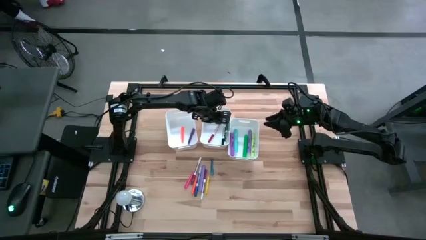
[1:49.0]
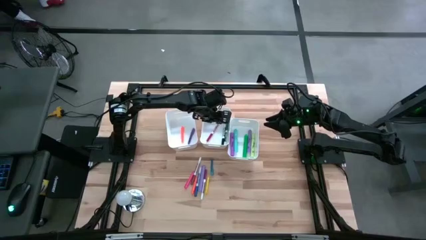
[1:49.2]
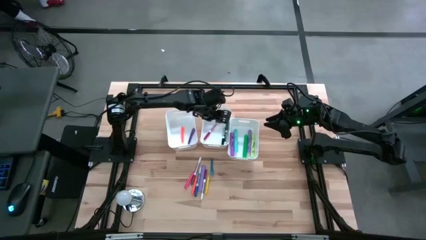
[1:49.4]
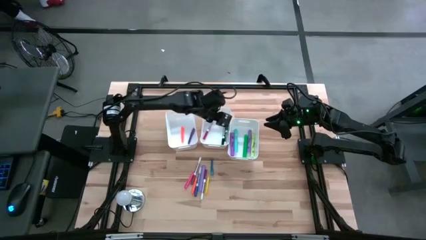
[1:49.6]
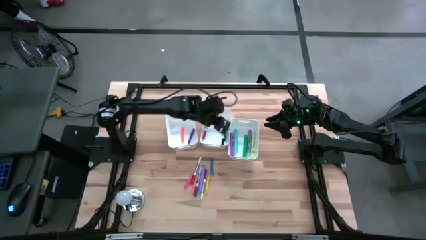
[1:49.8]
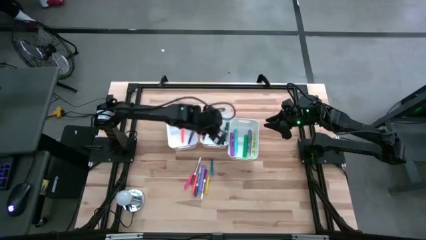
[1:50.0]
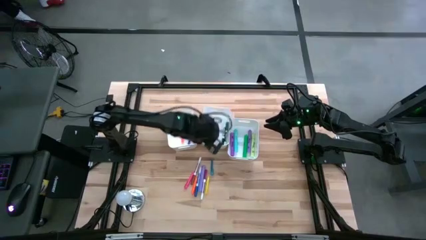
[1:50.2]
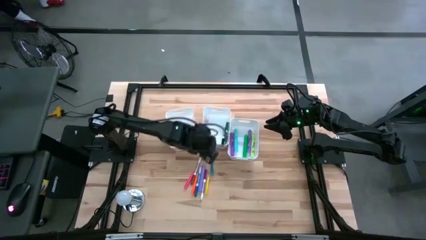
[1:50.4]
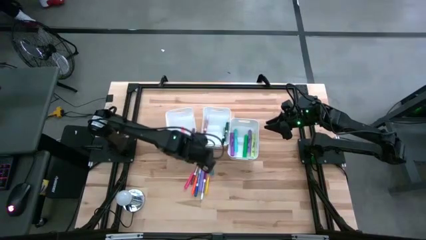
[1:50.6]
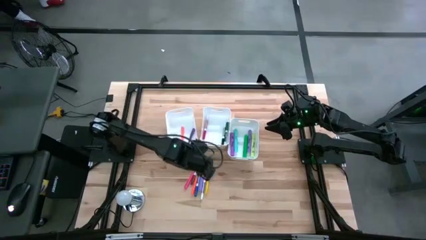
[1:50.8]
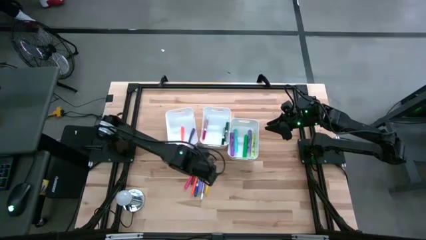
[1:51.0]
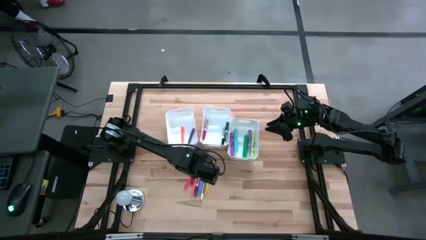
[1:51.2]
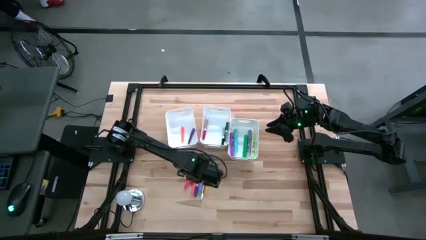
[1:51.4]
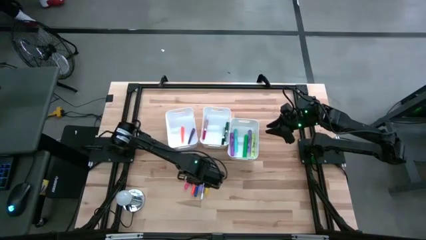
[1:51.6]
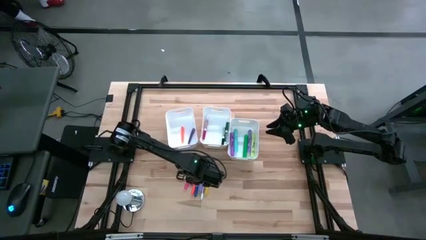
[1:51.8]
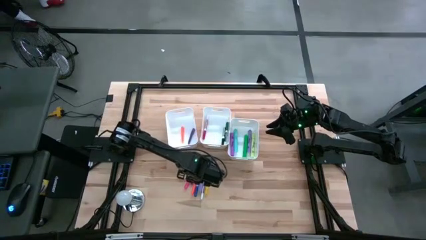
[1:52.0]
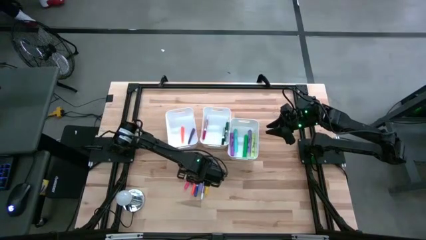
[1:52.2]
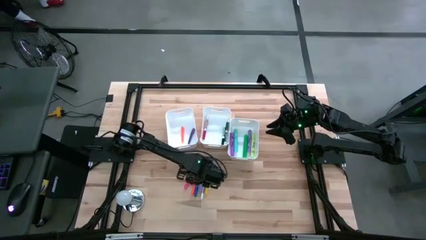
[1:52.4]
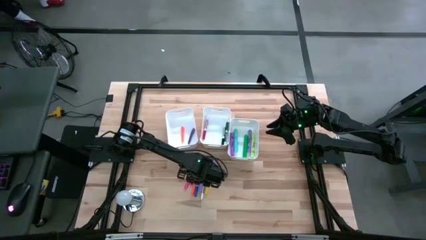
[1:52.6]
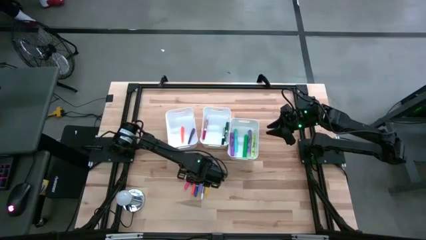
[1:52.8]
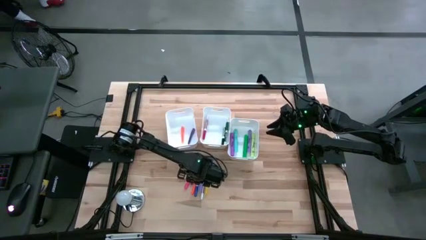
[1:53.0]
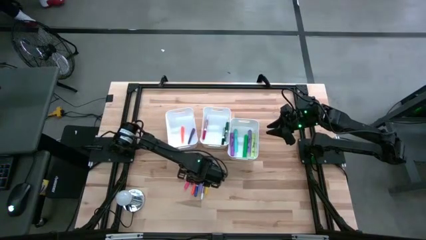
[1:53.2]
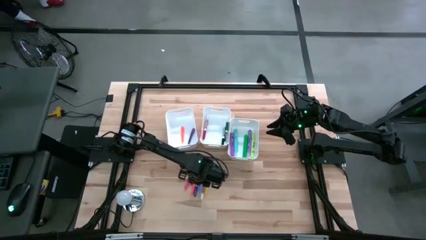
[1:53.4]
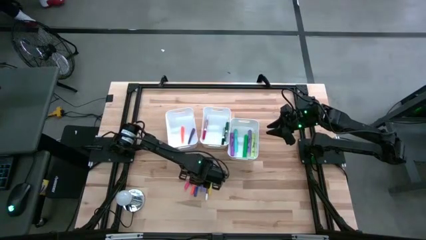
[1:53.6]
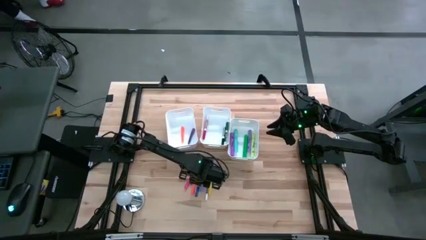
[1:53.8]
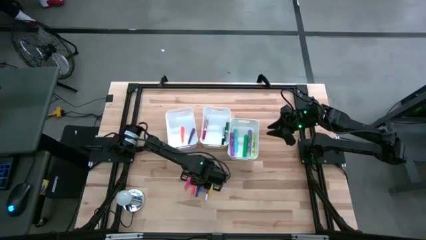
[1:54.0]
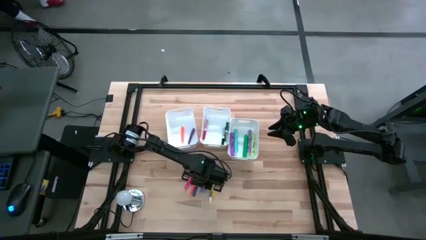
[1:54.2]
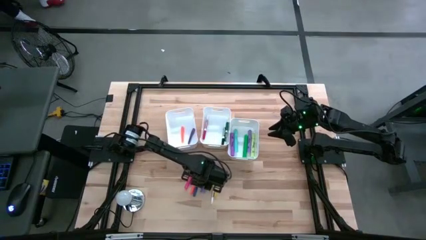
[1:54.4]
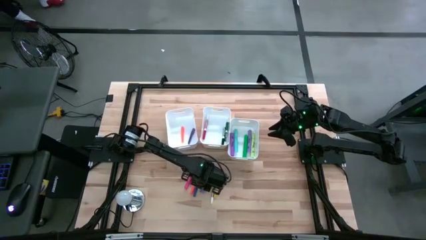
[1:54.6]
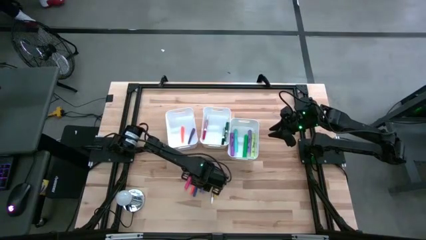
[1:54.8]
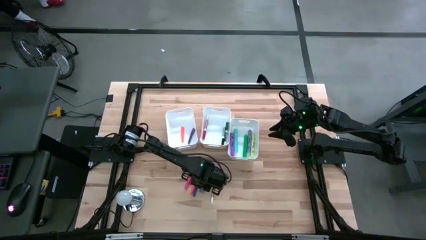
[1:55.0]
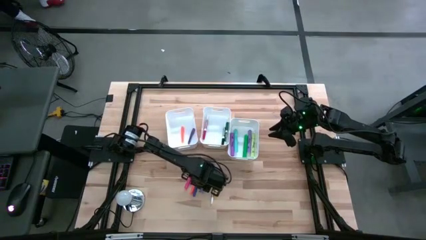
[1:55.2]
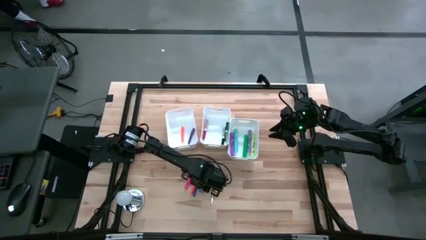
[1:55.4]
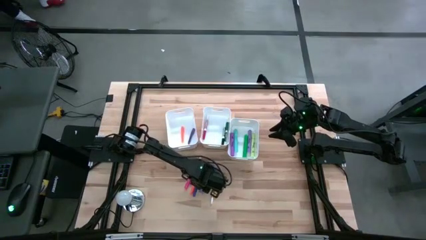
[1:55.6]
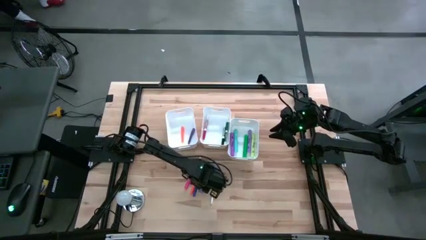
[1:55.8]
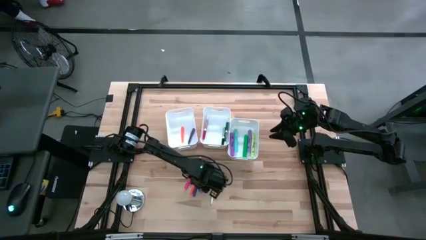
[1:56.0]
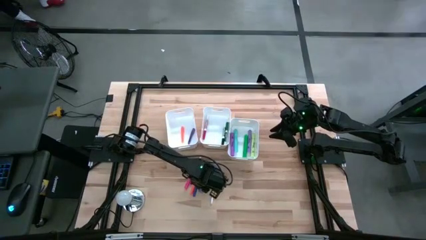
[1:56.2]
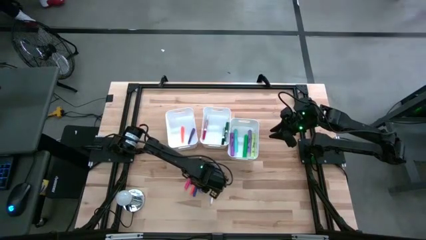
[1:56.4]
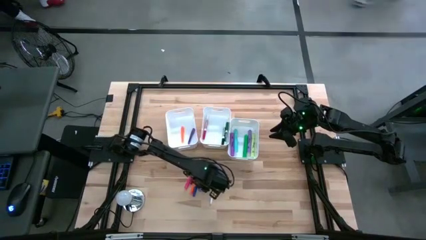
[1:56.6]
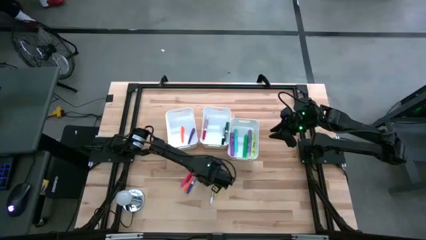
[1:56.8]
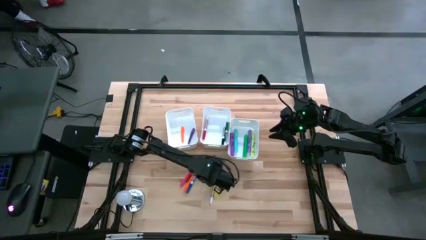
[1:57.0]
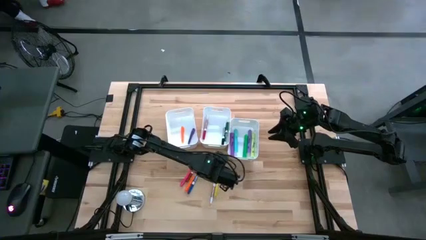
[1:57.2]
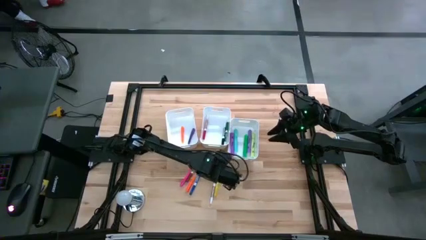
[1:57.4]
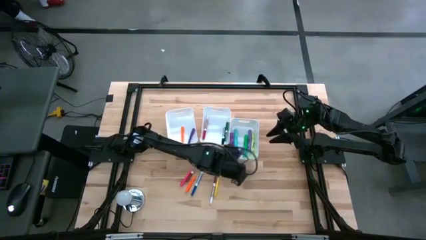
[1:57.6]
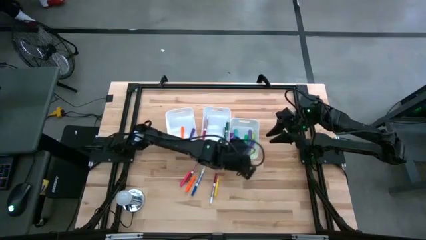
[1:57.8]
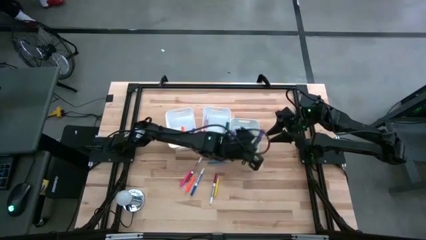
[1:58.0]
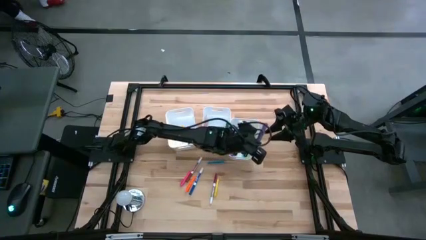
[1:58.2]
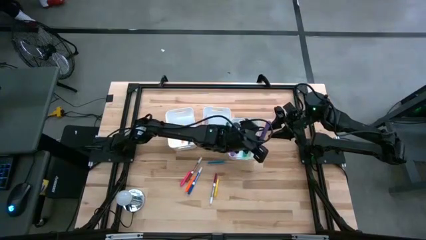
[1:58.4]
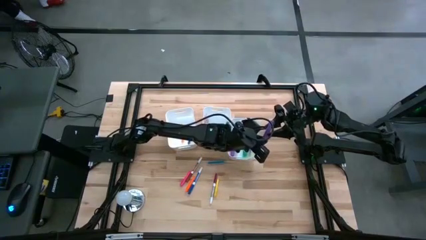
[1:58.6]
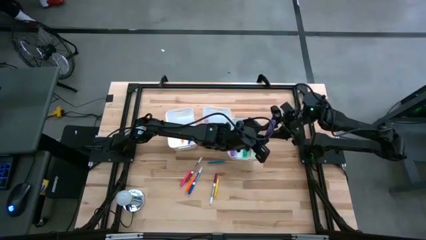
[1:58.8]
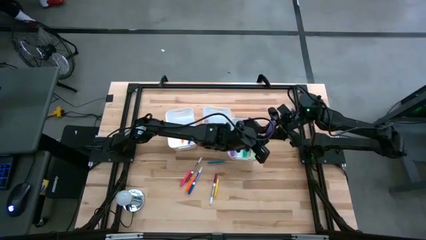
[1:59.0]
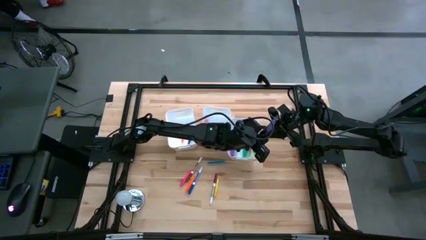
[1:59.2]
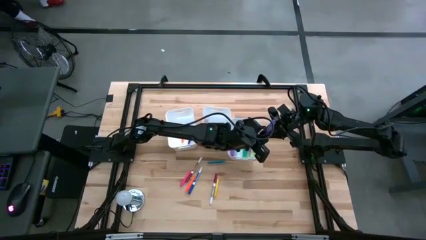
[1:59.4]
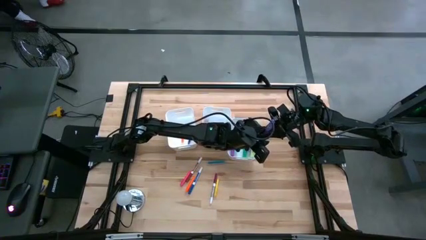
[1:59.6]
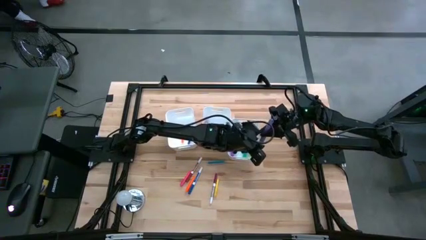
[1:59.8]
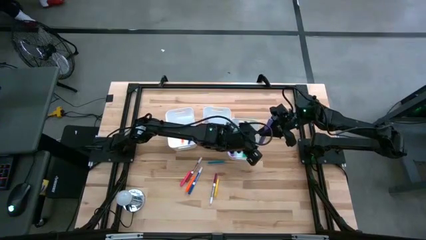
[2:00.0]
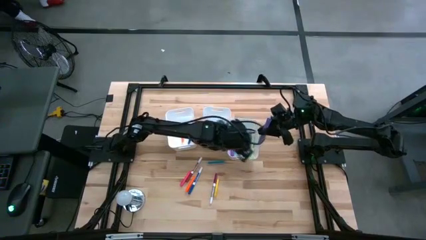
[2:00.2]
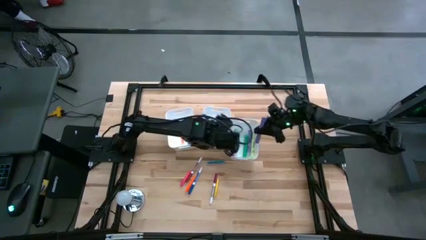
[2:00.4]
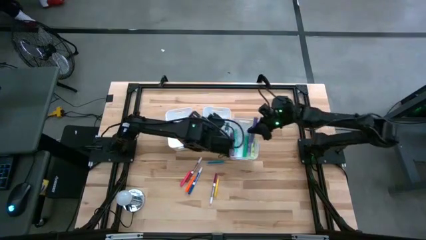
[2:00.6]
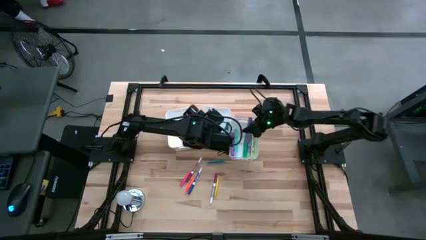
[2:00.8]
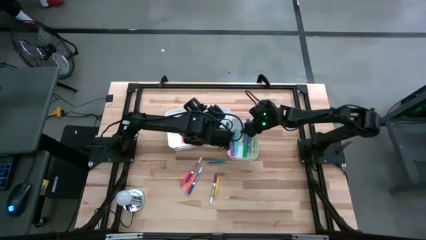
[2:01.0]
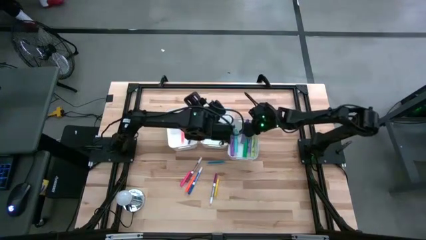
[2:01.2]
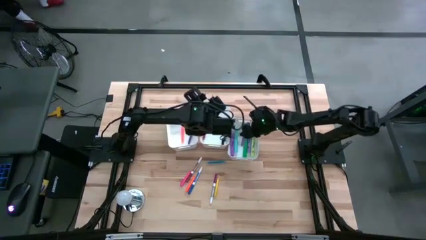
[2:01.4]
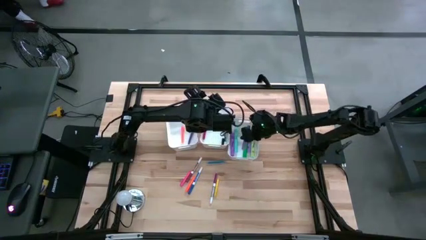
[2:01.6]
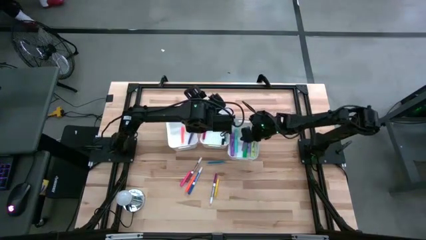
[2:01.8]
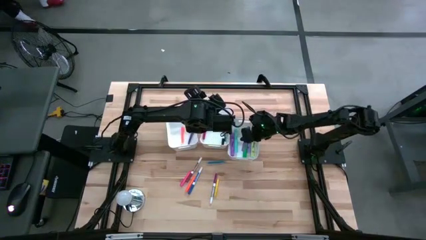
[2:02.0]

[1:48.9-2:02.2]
Task: Pick & Place Markers
Put the violet highlighter into the right white bin

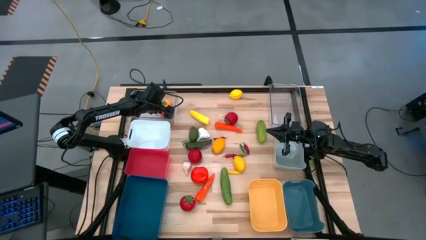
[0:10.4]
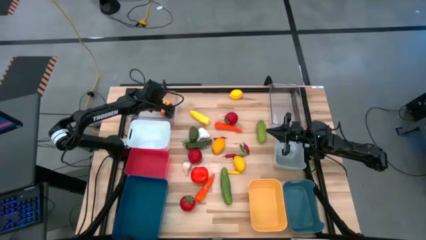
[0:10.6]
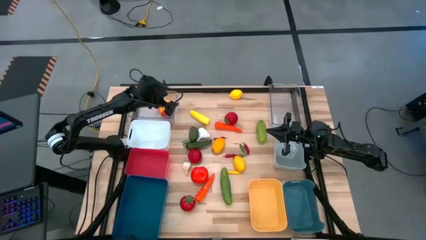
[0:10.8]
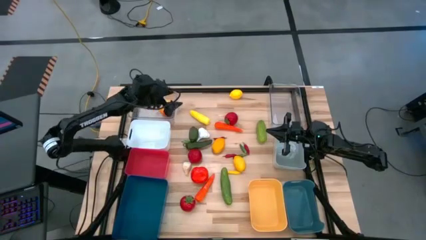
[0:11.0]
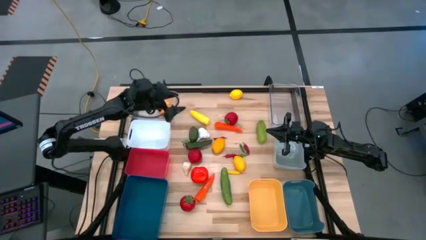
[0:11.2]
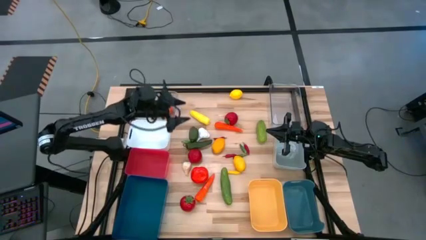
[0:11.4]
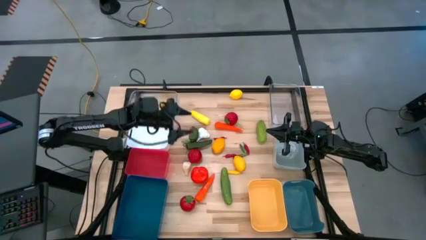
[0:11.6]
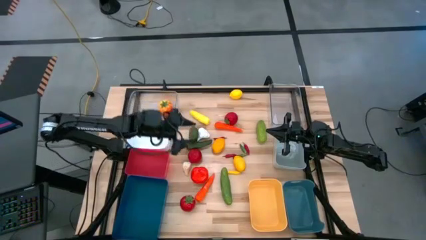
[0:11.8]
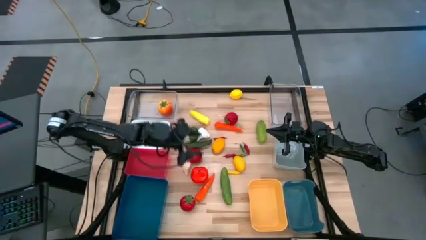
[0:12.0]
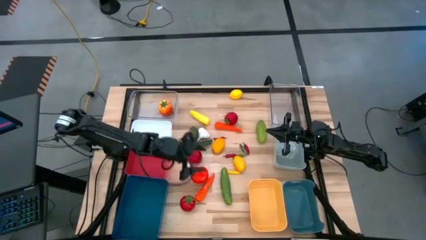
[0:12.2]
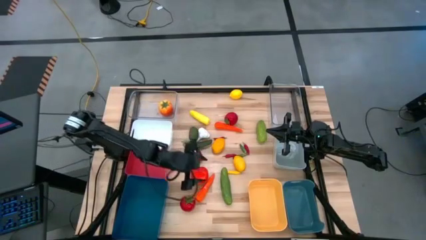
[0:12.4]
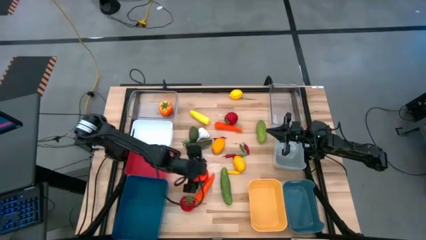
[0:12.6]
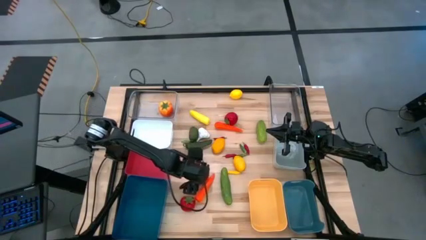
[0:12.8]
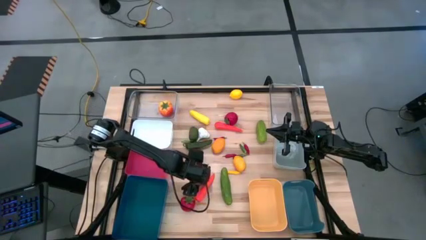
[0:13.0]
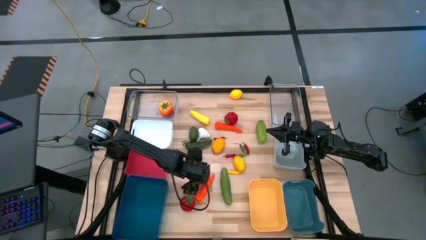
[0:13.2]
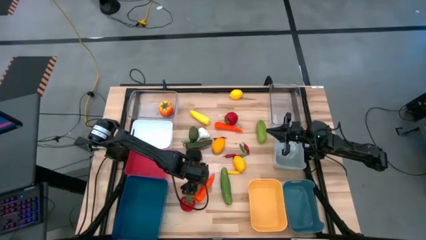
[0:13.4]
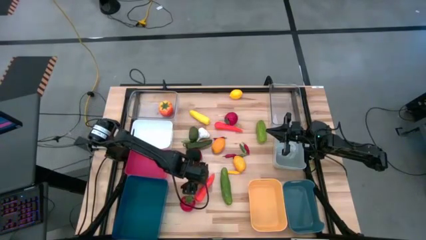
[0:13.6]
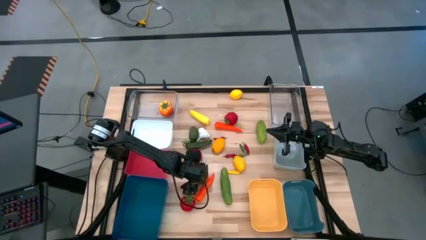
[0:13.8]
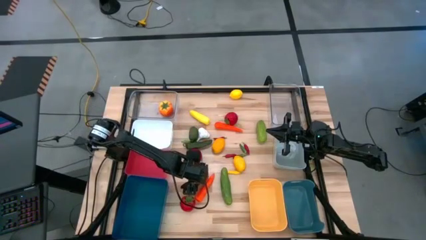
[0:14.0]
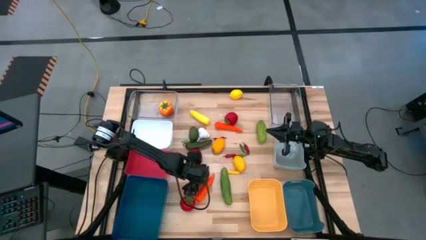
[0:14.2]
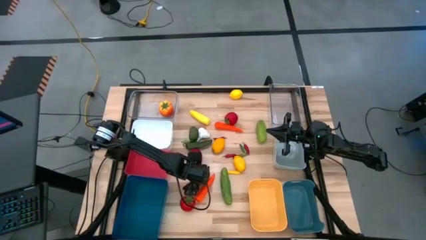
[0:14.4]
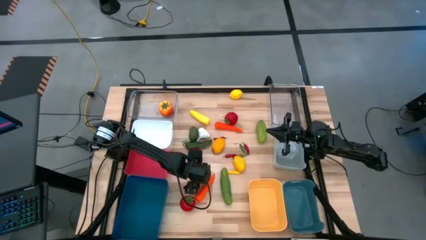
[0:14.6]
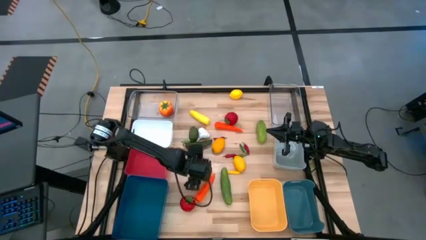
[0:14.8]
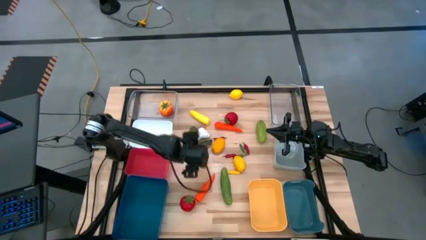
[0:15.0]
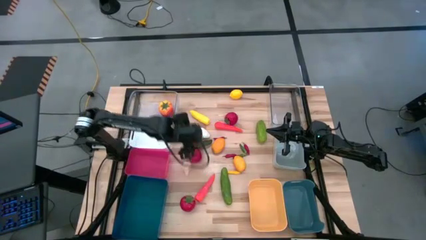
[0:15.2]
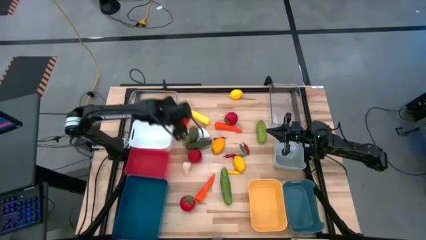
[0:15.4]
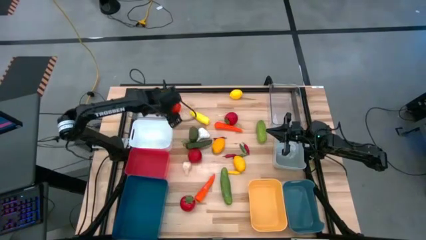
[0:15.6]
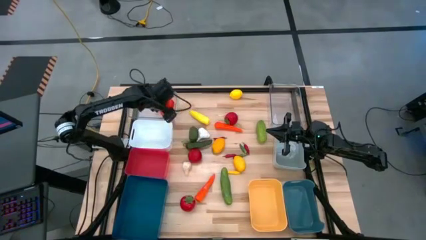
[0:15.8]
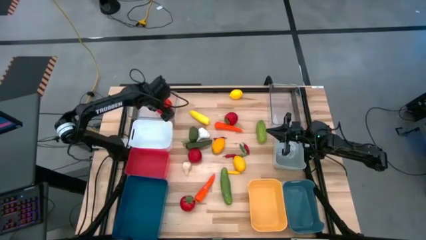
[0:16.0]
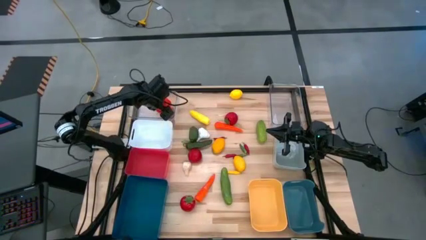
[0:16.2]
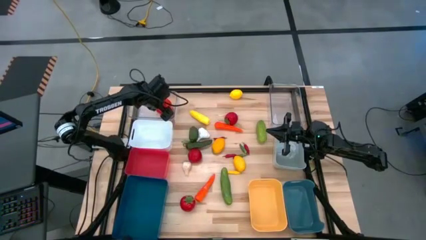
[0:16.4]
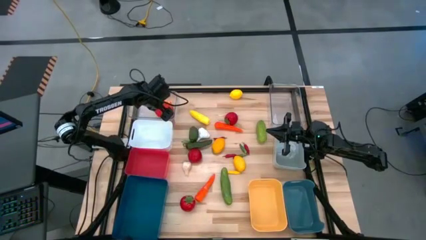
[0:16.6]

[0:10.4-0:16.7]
Task: Sort produce into baskets
Put the orange tomato into the left transparent bin
